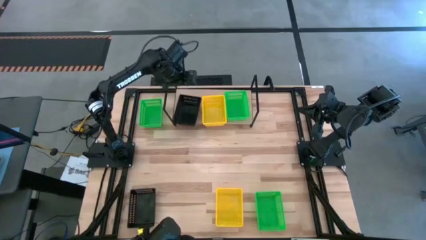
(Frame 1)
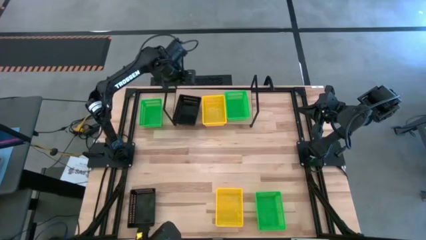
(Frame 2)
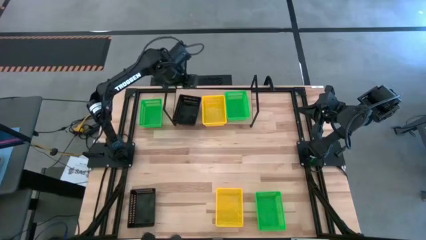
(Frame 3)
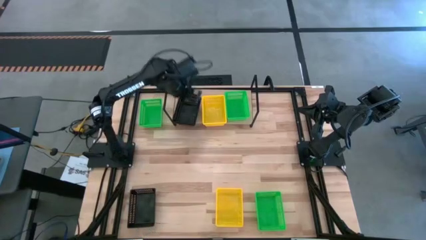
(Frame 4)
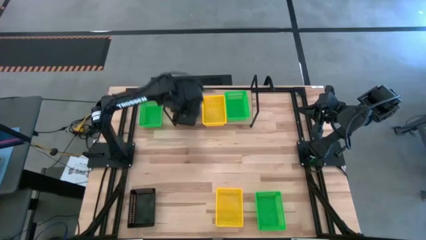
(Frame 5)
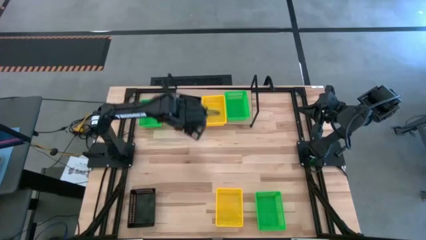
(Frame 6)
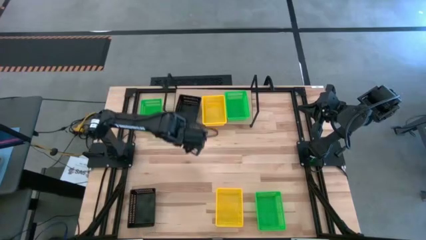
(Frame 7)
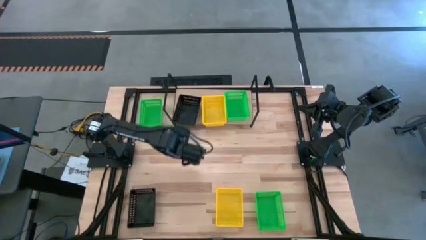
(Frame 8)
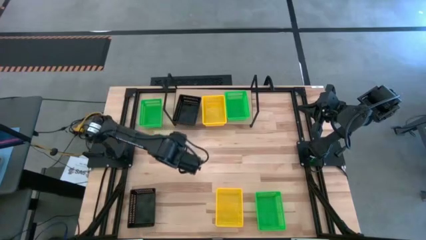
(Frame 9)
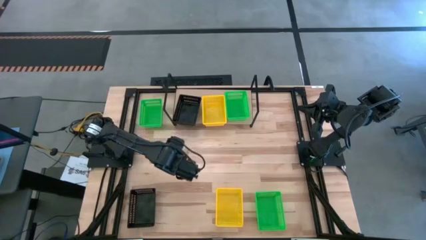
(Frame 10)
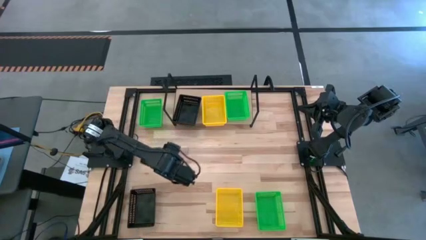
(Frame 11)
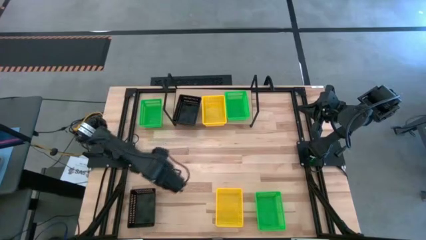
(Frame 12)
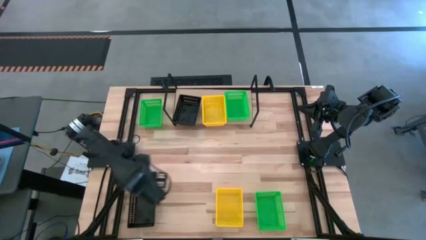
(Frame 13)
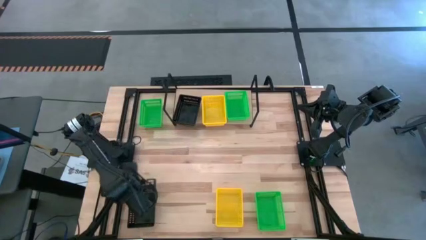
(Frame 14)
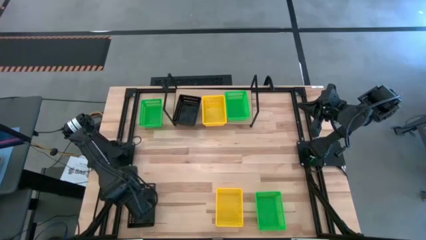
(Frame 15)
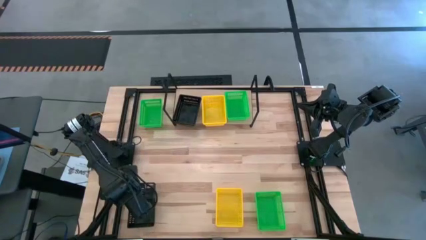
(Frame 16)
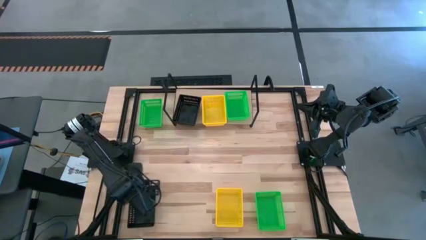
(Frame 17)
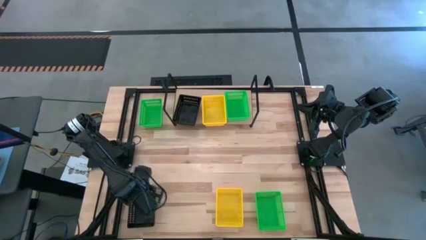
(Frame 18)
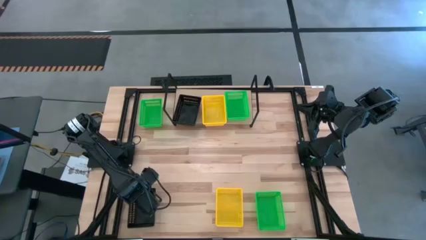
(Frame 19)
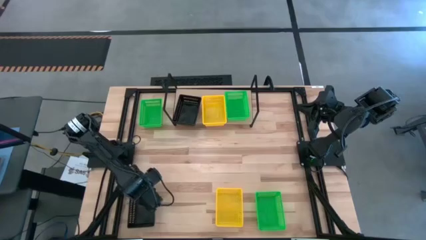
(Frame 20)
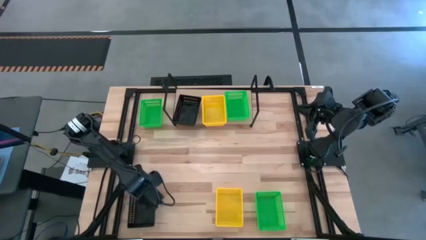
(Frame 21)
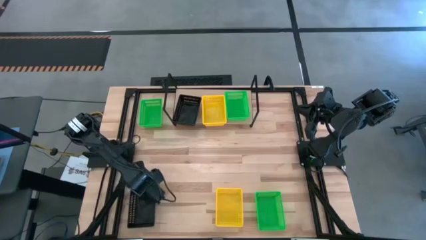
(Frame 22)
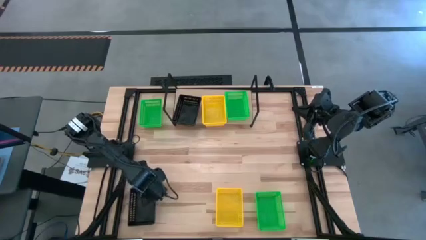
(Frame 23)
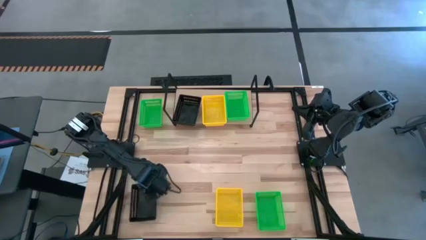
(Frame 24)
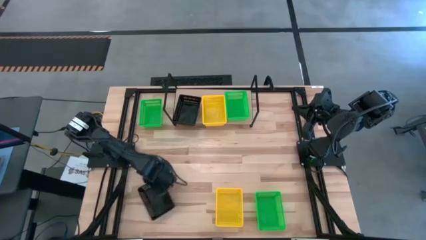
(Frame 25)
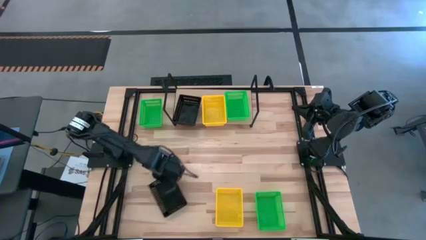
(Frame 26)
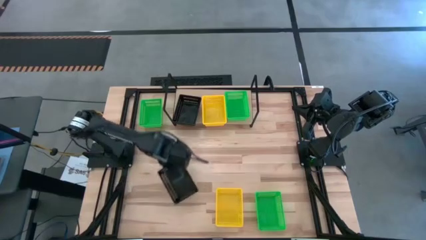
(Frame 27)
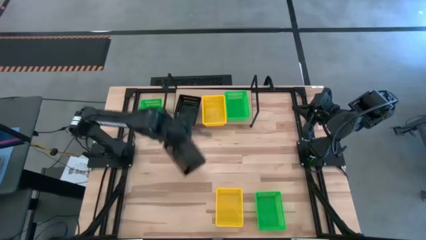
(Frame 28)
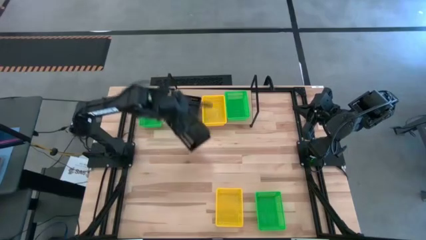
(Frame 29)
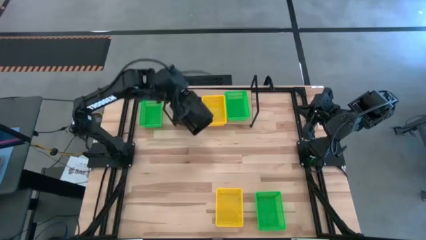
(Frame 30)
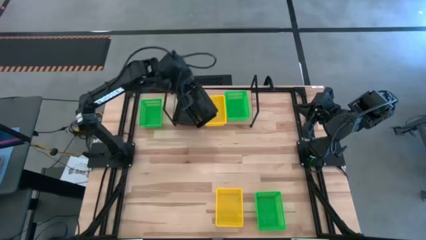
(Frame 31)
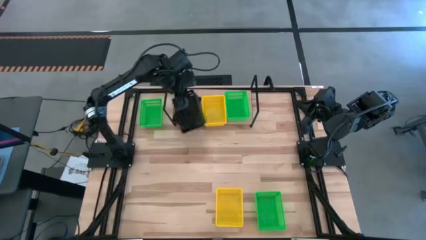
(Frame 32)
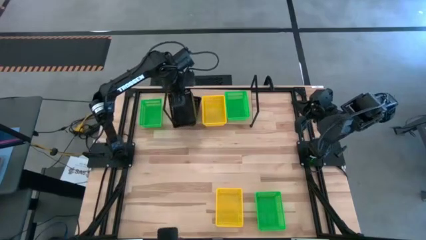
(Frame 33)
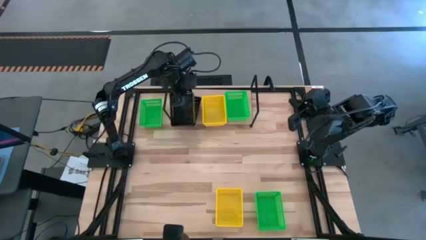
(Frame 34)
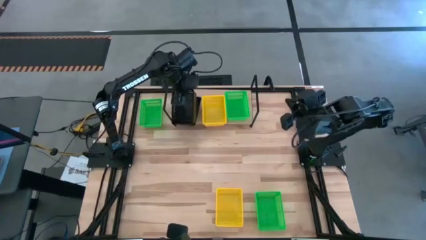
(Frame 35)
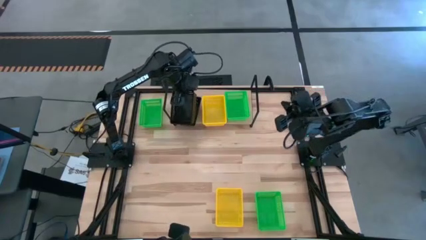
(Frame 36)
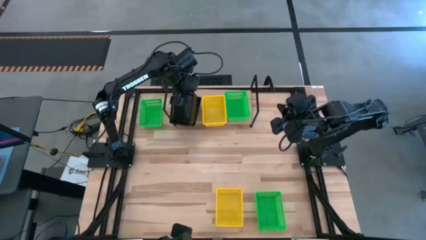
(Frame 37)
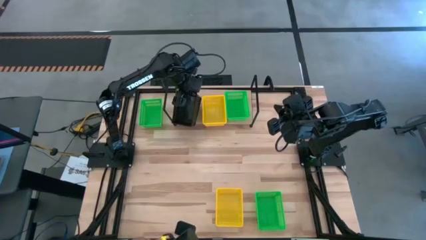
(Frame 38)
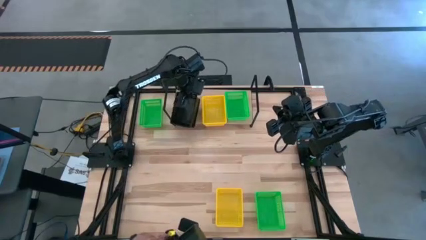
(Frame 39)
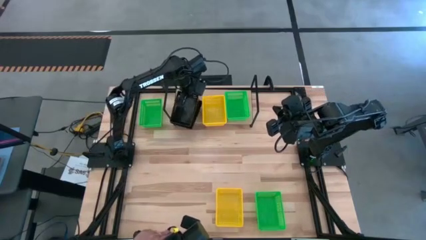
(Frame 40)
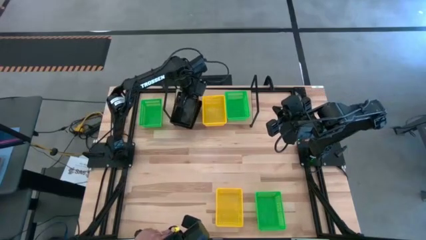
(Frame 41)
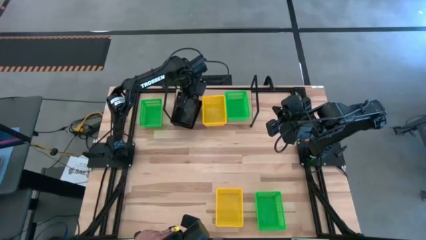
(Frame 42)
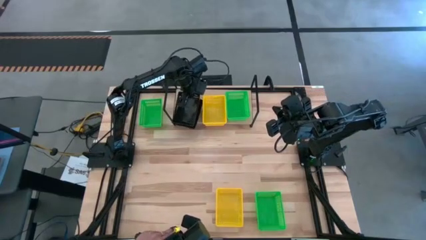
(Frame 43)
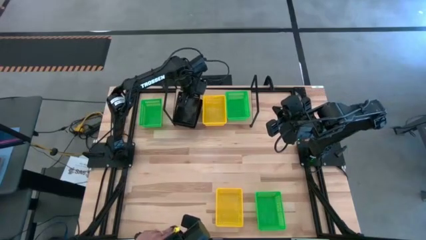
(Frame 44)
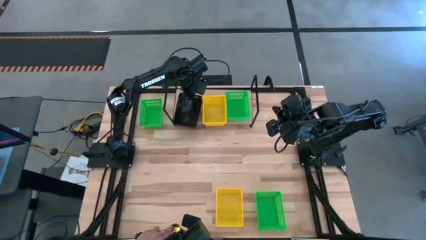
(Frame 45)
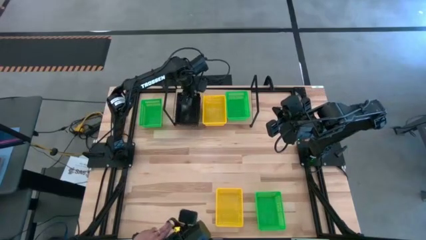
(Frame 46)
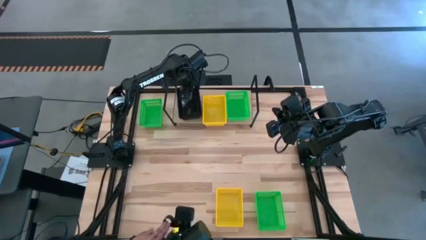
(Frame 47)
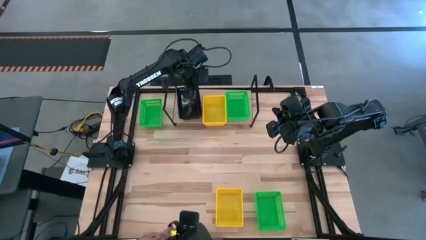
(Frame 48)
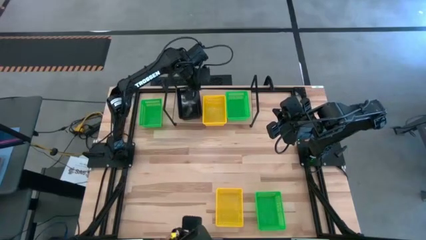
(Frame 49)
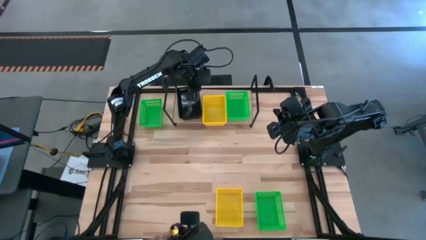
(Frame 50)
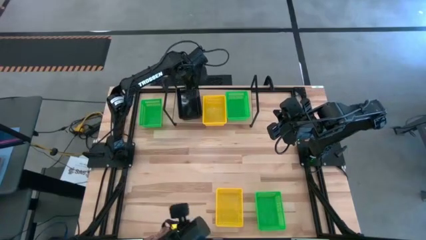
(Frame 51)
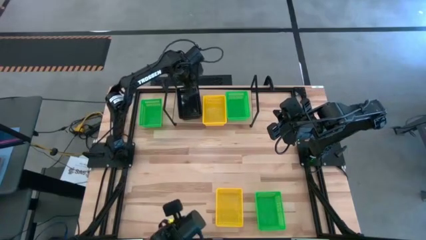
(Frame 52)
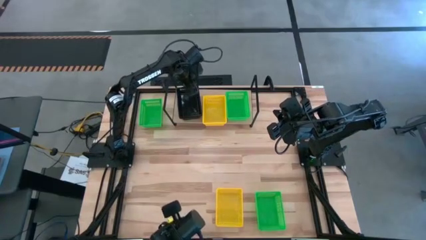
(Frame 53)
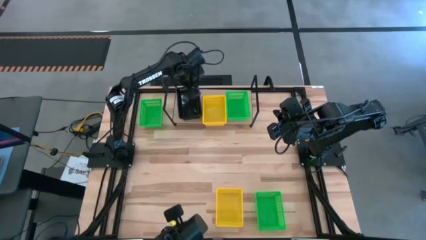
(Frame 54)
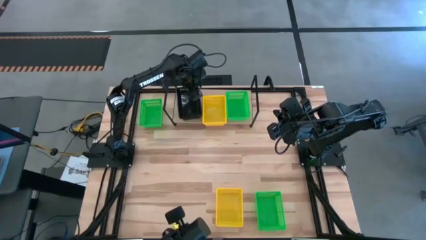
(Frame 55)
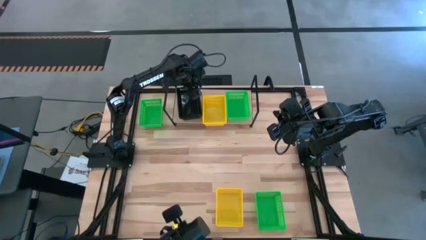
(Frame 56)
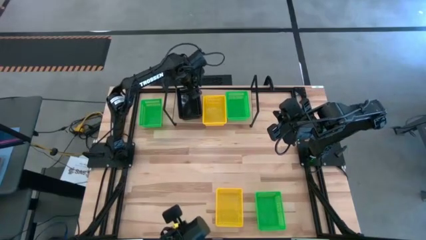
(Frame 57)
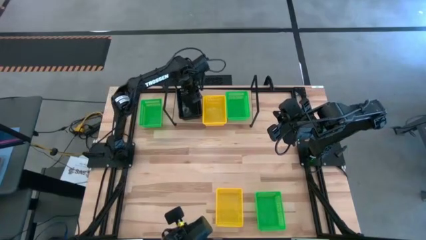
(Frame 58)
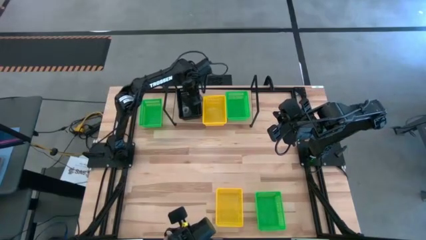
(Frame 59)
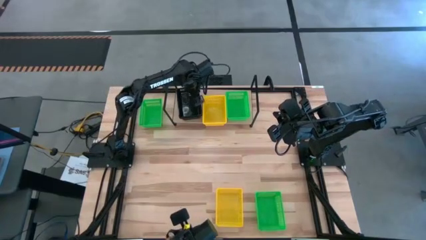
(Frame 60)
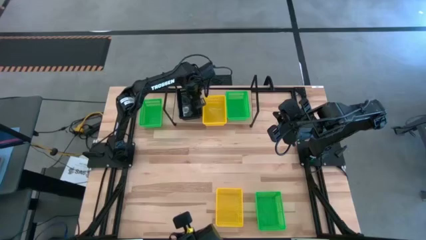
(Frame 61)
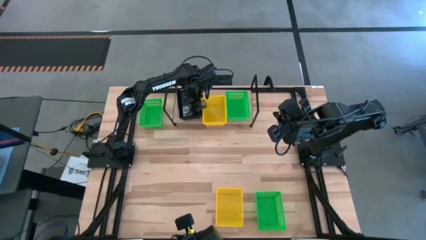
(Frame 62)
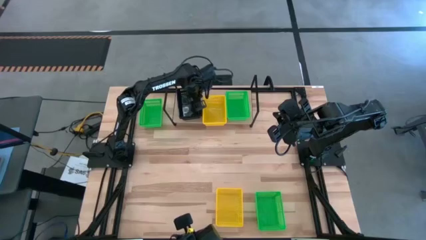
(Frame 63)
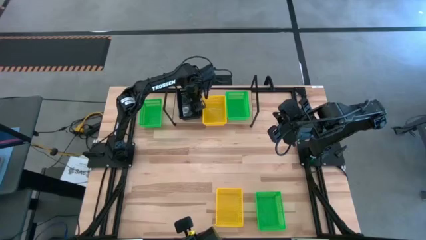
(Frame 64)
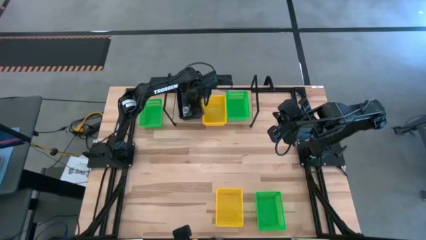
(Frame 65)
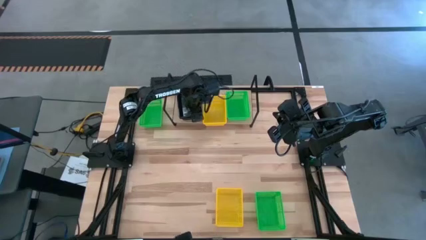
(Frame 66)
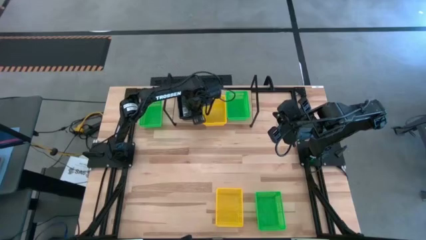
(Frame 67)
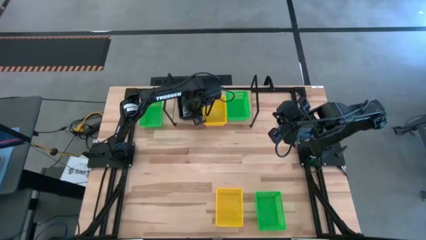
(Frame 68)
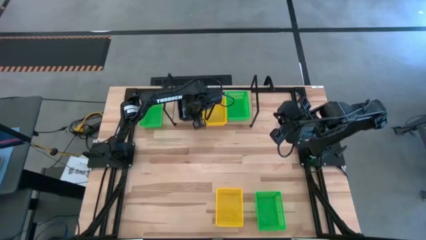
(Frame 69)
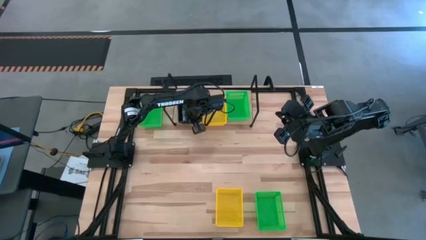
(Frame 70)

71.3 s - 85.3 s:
Task: Stack baskets on shelf by color
Stack the black bin on top of the stacked black bins on the shelf
